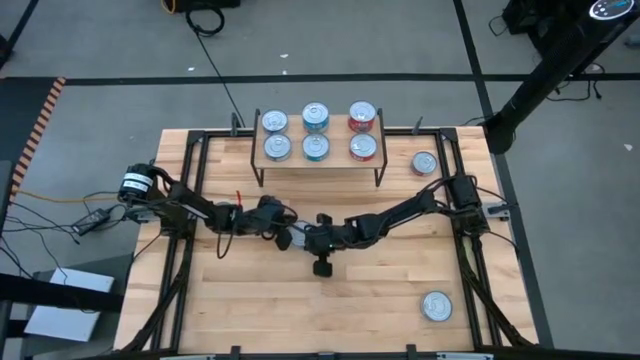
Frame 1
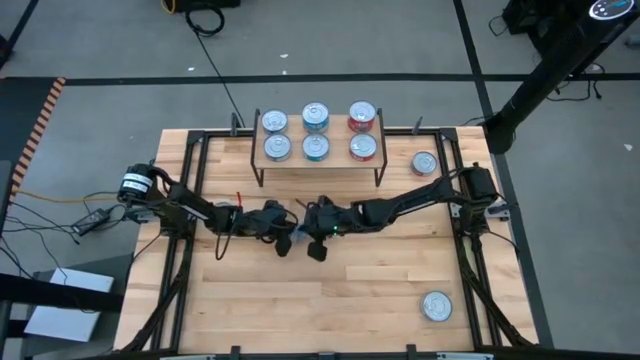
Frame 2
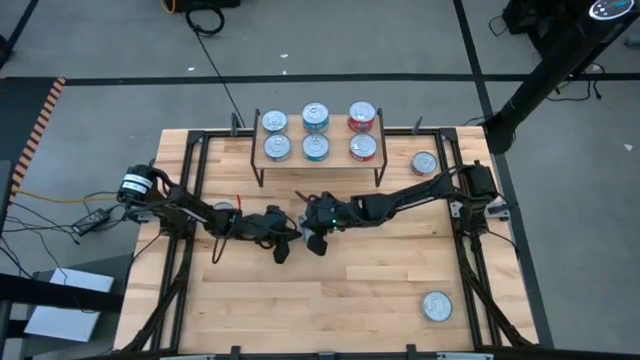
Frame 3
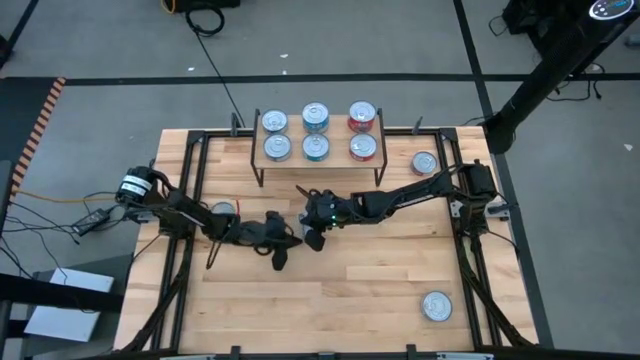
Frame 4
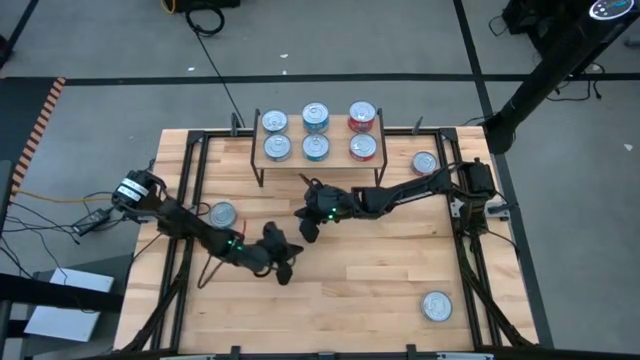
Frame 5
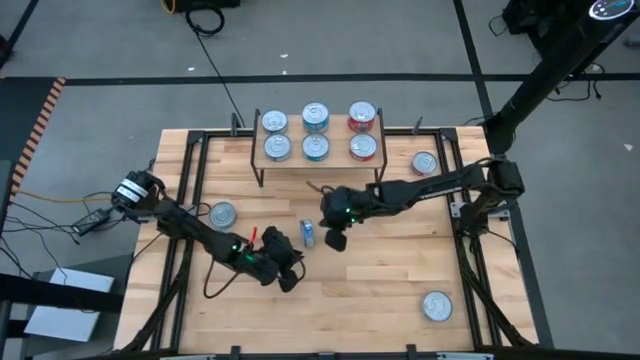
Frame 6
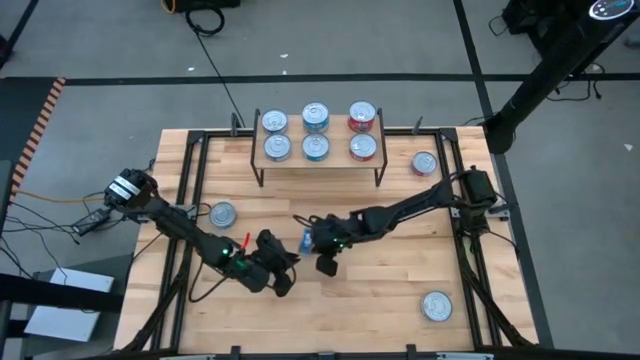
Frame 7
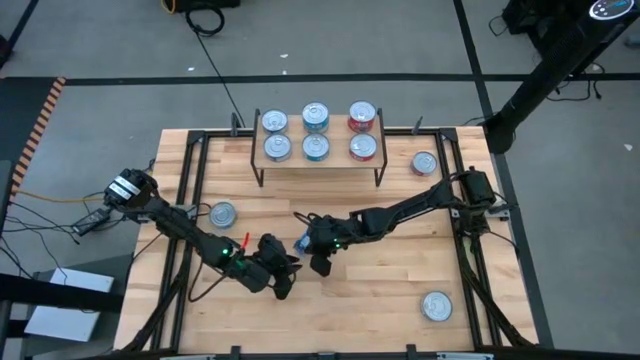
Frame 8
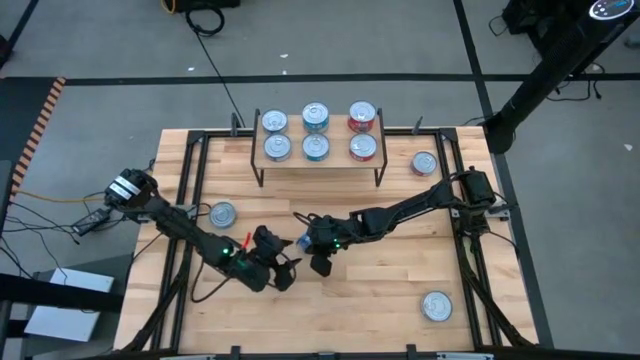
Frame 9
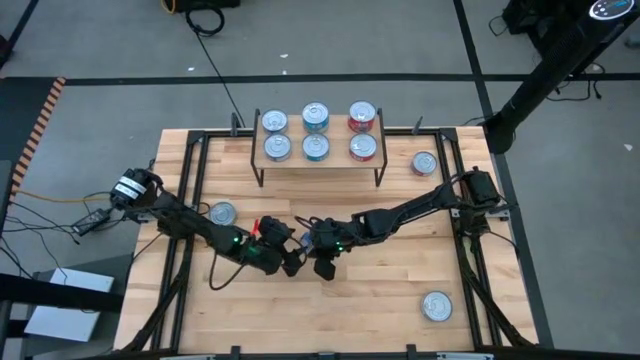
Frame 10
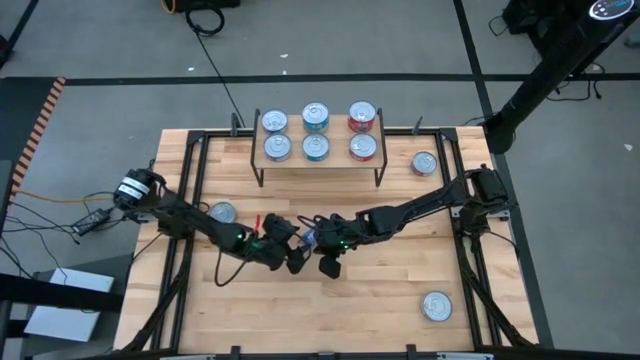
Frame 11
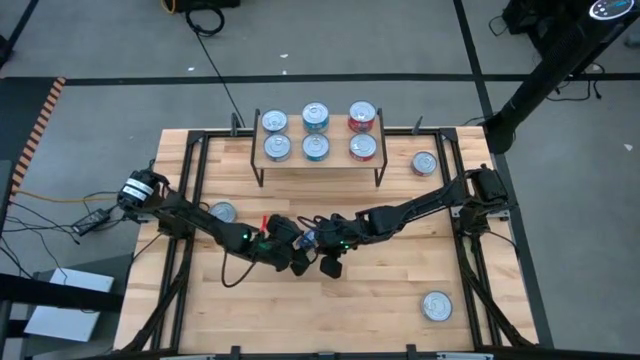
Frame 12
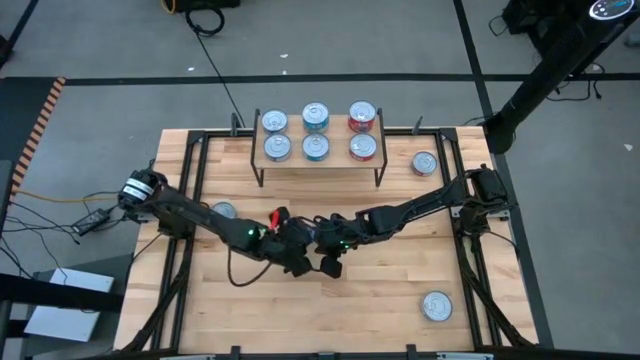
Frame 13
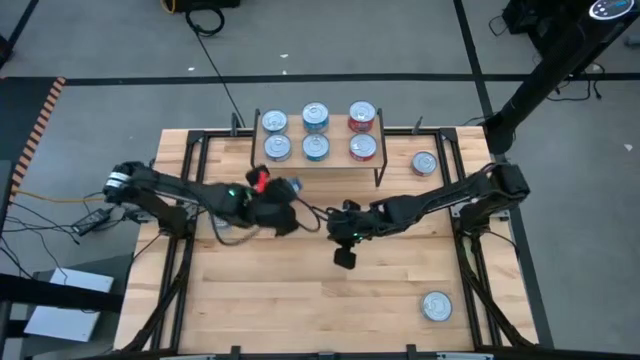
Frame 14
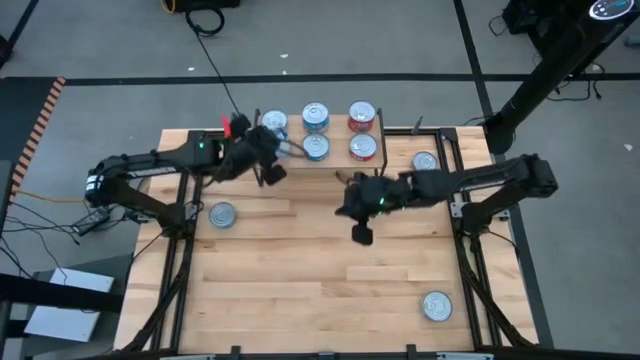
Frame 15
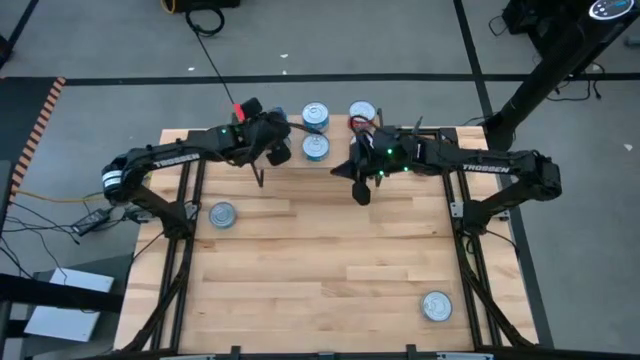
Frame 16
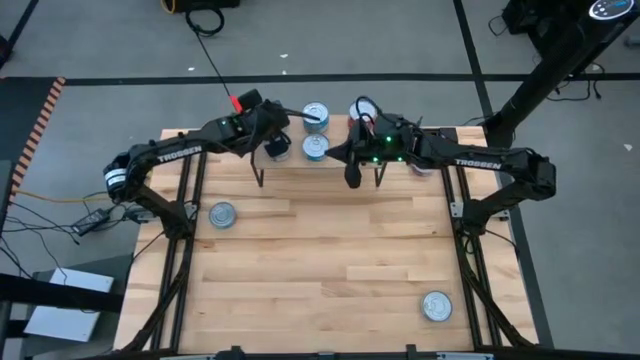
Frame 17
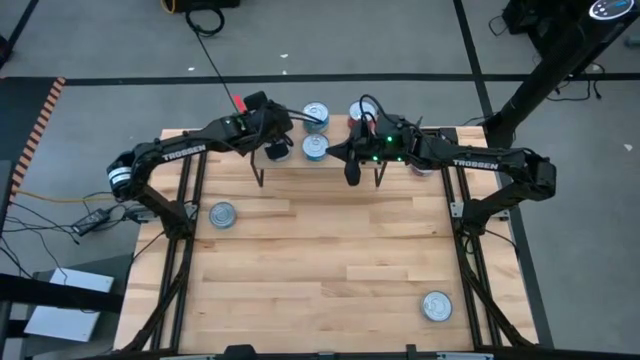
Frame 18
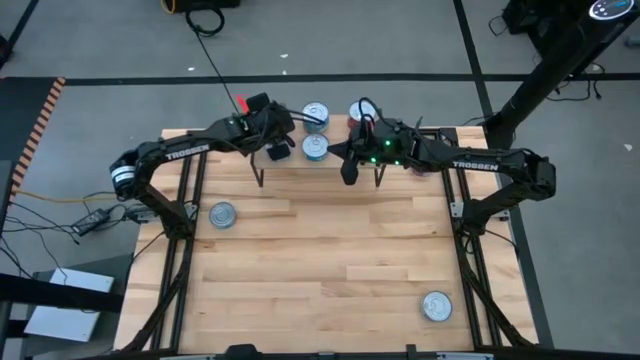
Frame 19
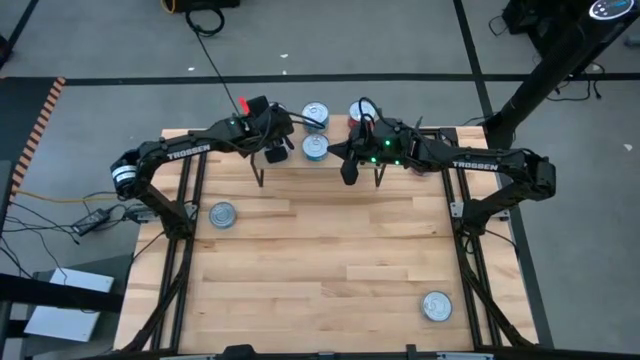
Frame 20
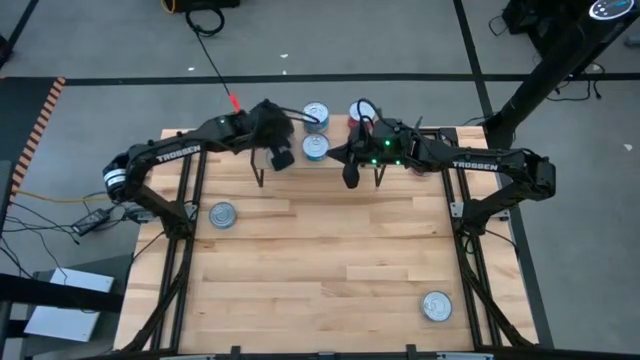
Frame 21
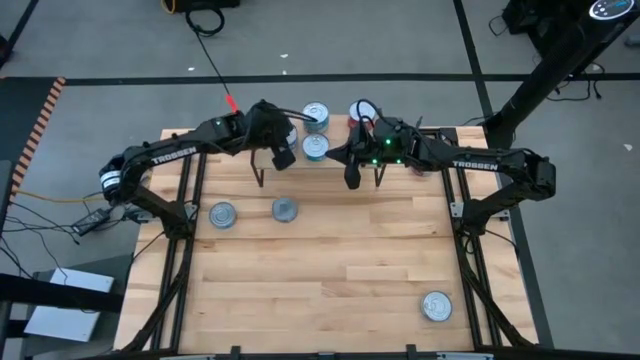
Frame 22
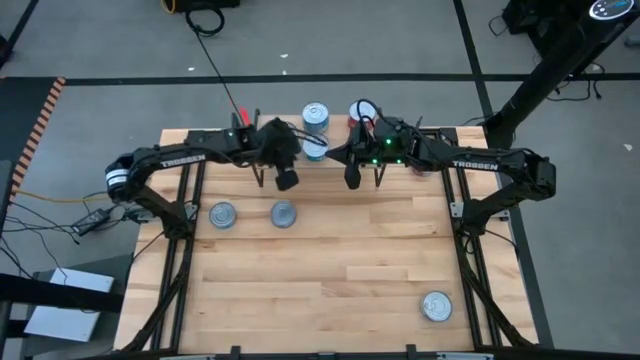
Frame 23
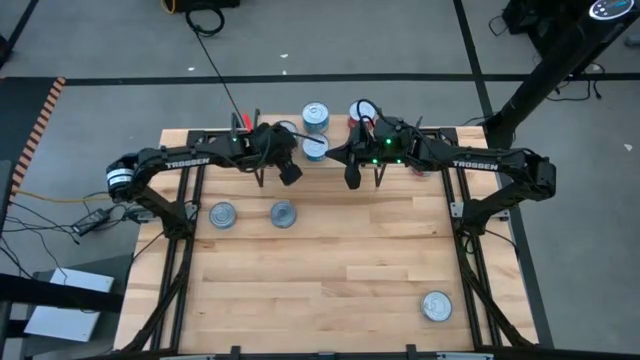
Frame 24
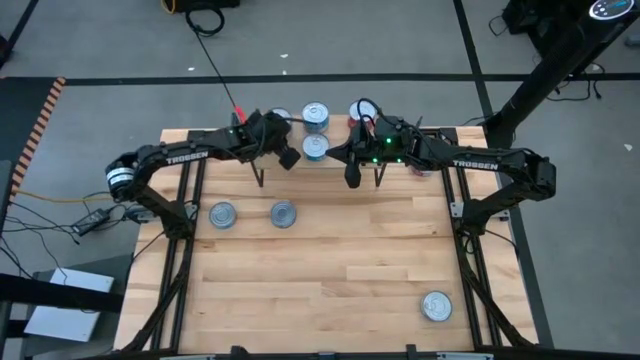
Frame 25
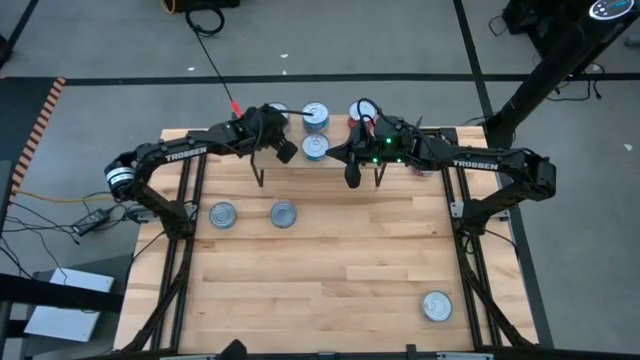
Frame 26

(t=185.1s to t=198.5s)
Task: Stack canned seafood by type on shelf
Stack the blue tuna can on top of the other blue can on the shelf

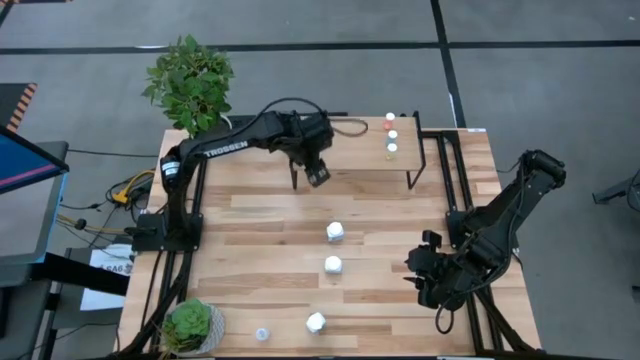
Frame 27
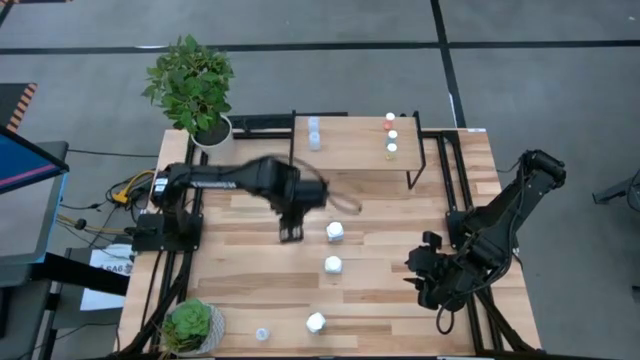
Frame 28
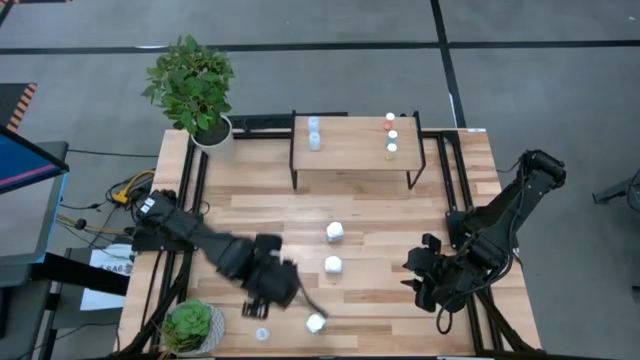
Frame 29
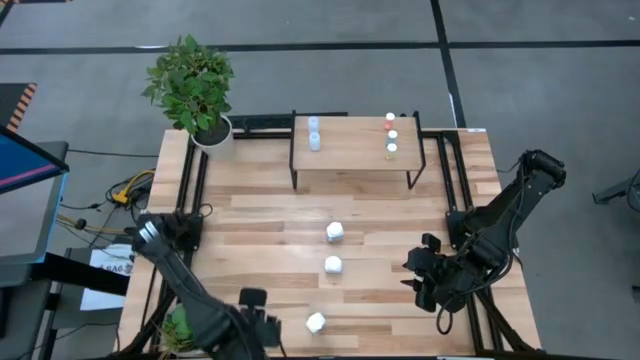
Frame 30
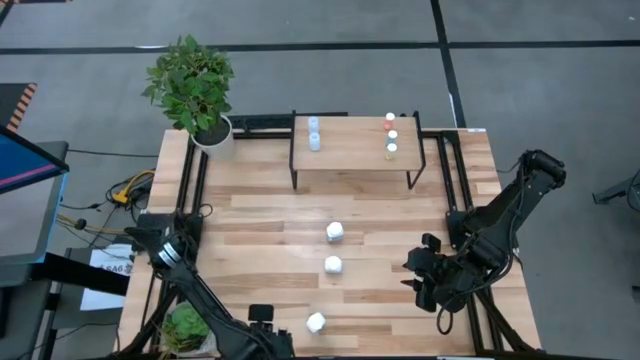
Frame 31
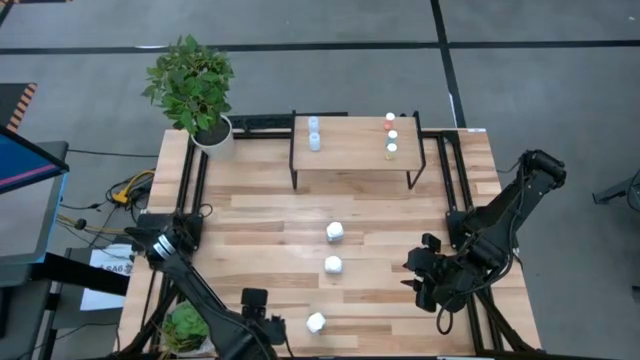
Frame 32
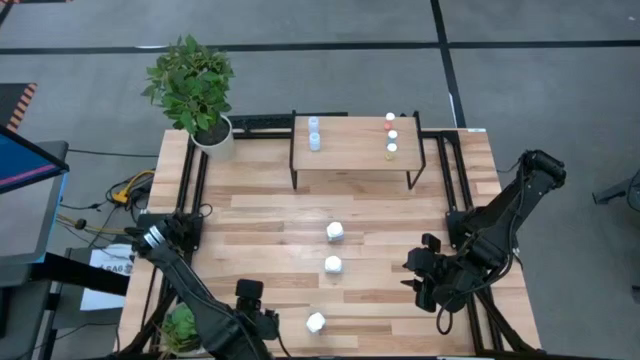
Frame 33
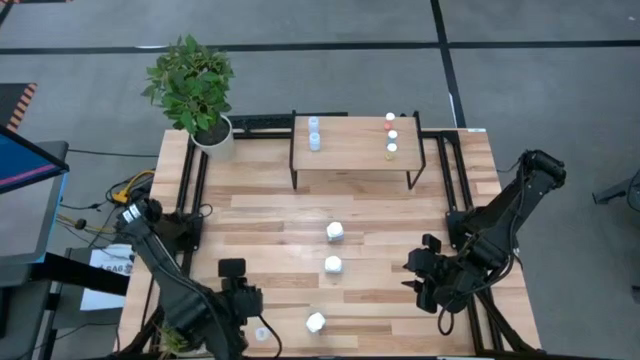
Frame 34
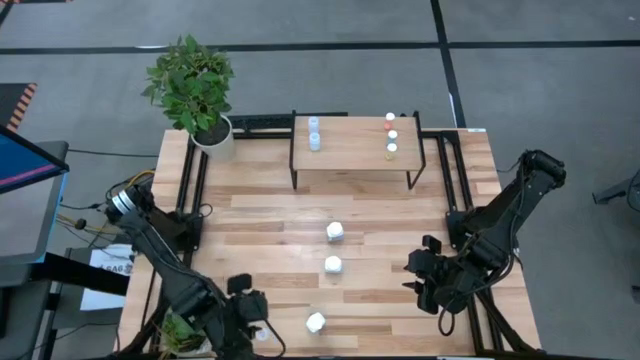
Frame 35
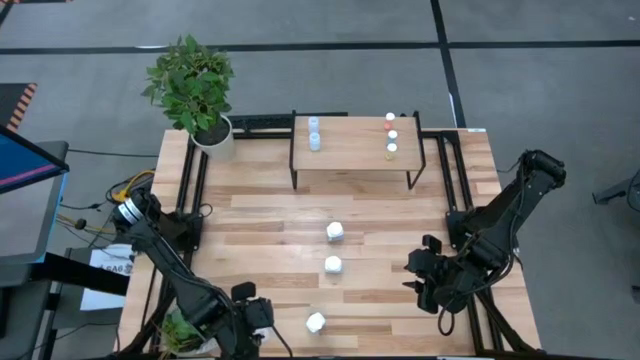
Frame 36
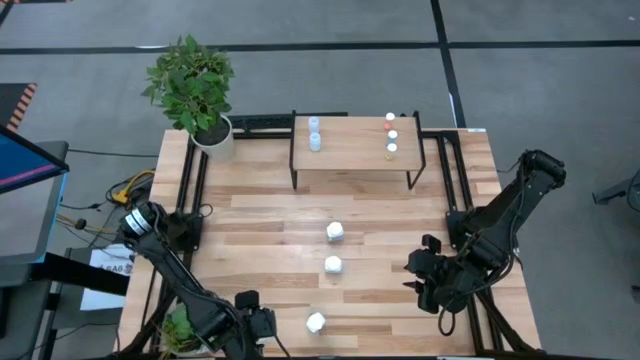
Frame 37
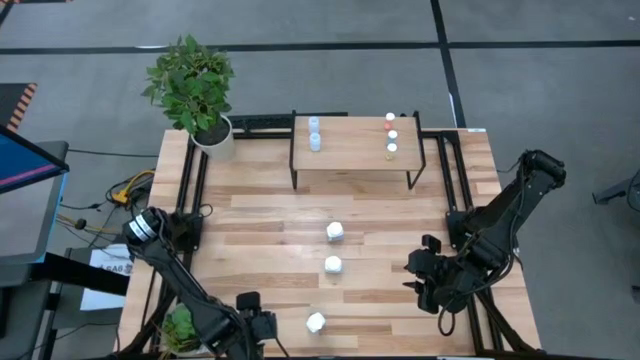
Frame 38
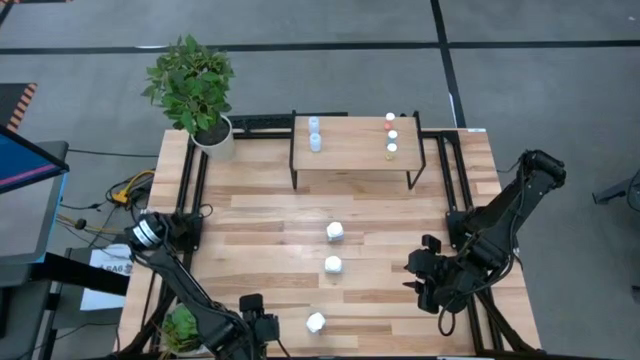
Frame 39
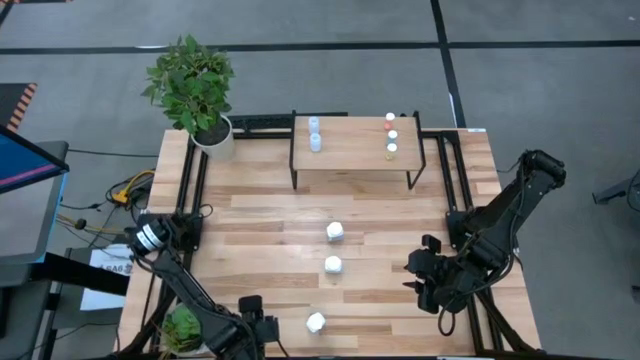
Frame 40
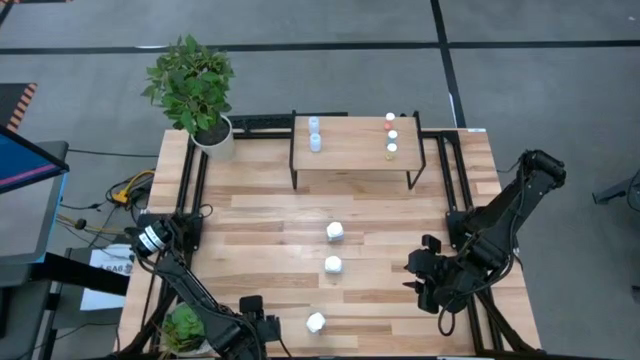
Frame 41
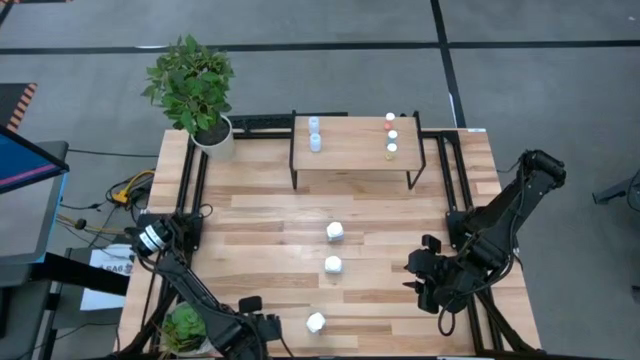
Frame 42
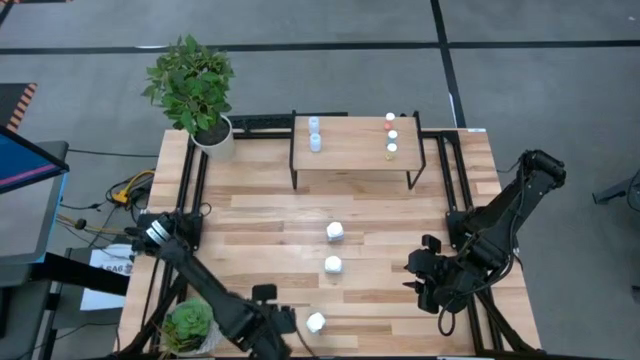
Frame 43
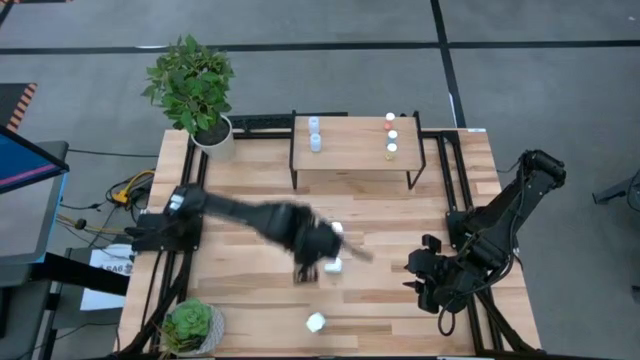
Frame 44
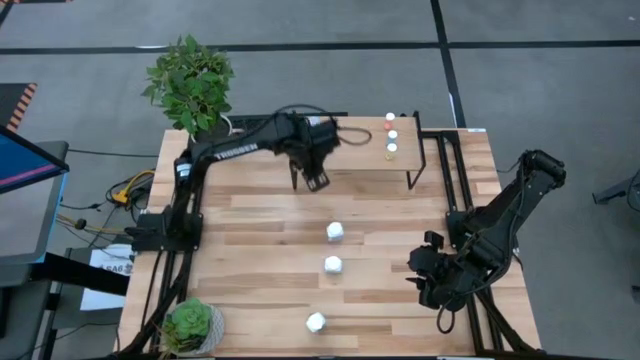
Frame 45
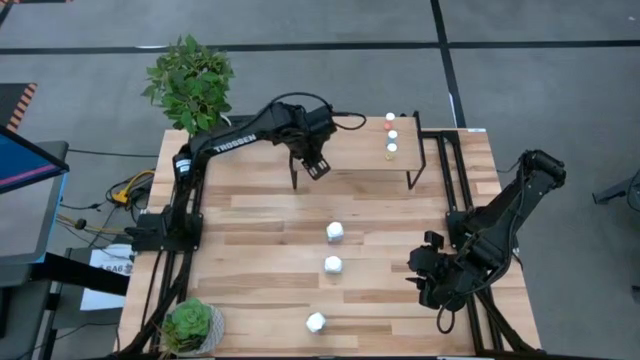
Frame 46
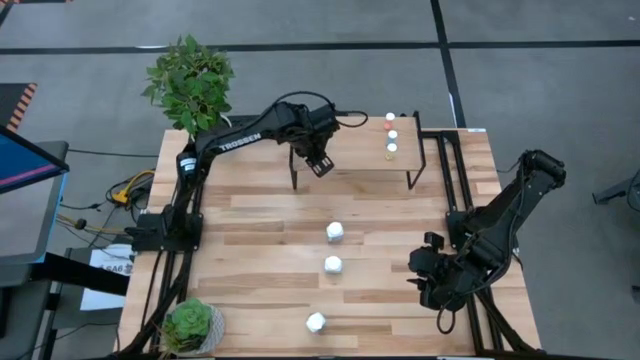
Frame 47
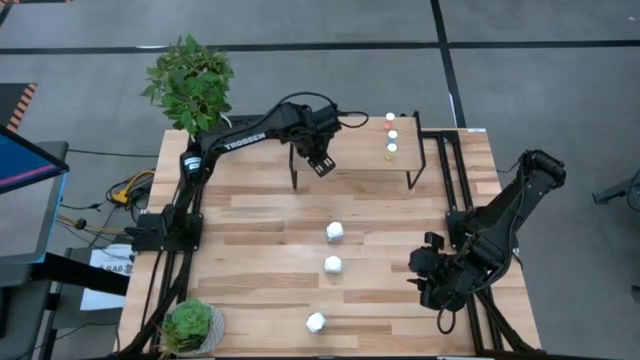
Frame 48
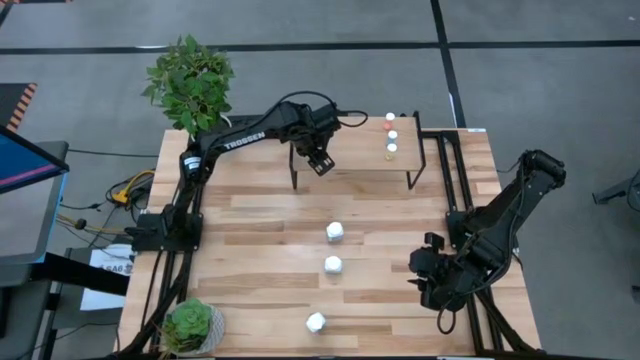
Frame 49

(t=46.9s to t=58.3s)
Task: Pick and place medicine bottles onto shelf by color
Put the transparent pill bottle on the shelf aligned with the other transparent pill bottles
